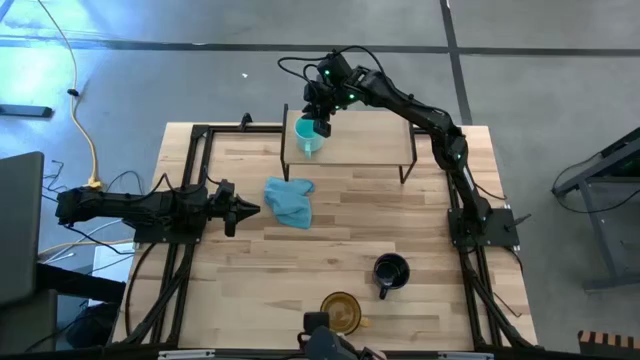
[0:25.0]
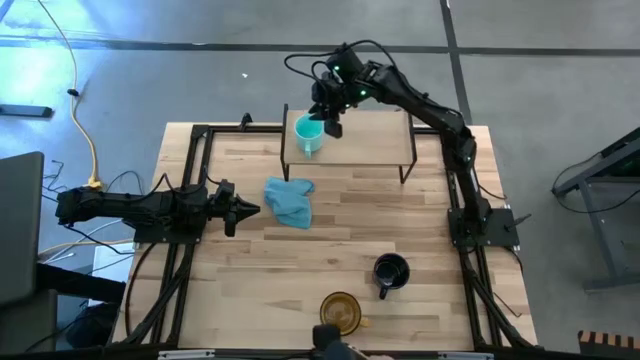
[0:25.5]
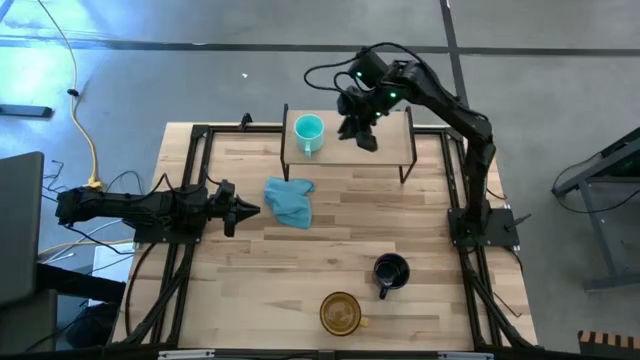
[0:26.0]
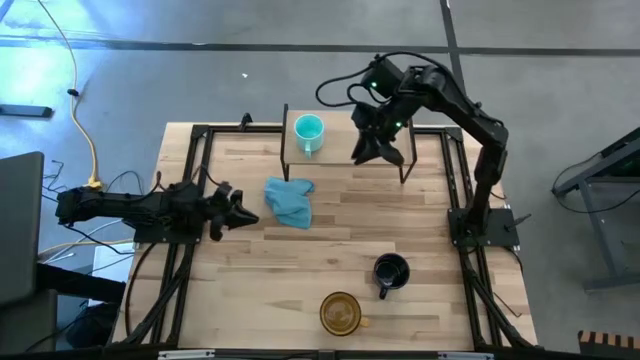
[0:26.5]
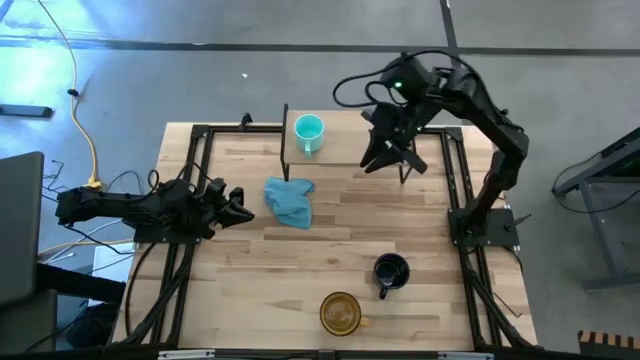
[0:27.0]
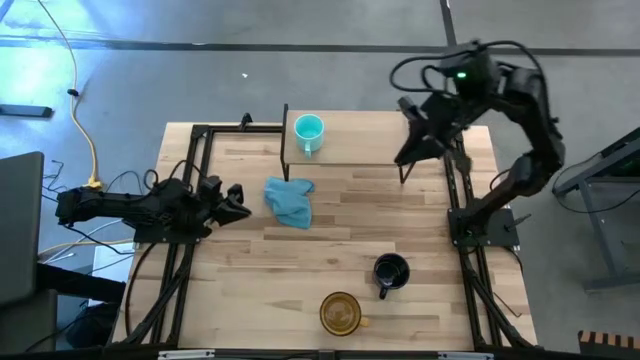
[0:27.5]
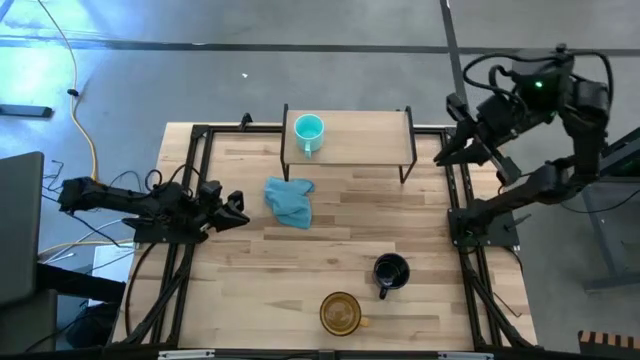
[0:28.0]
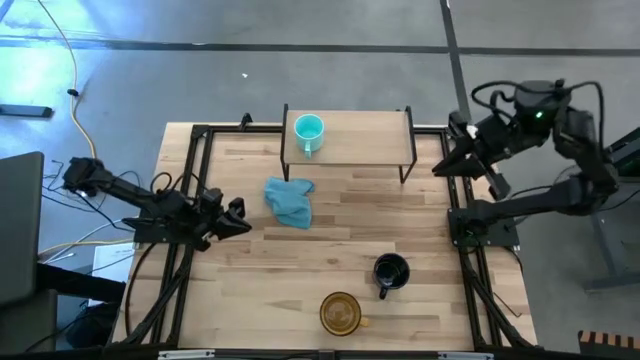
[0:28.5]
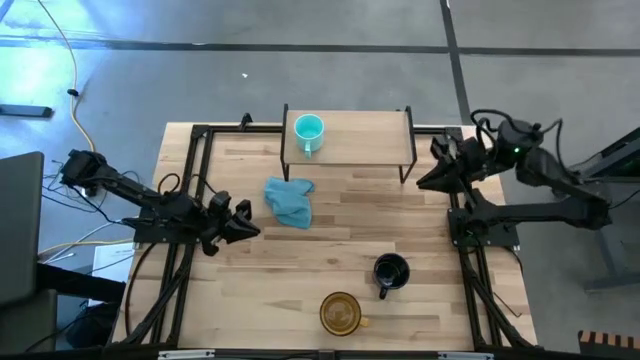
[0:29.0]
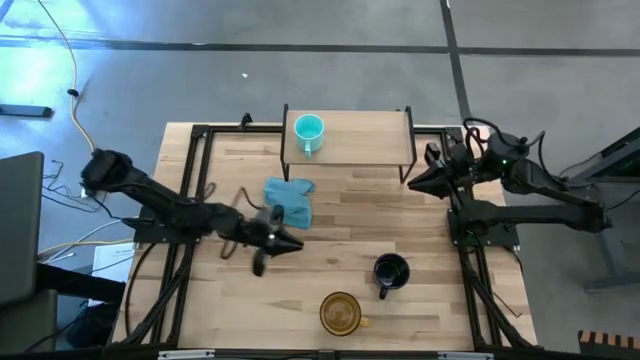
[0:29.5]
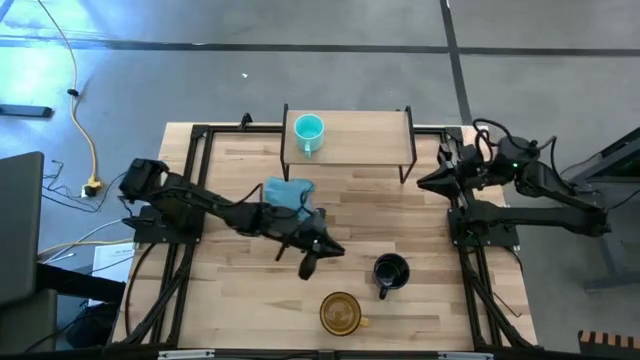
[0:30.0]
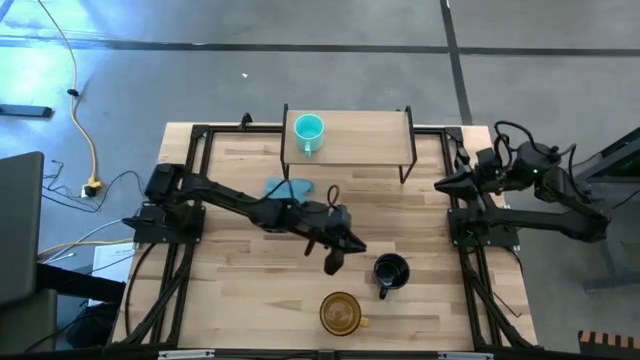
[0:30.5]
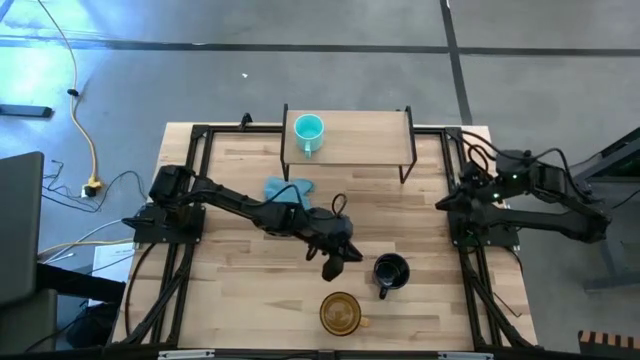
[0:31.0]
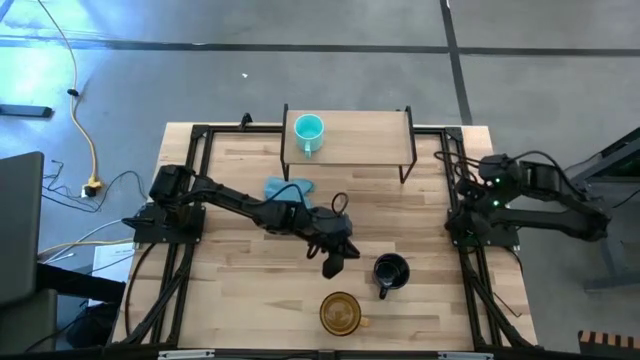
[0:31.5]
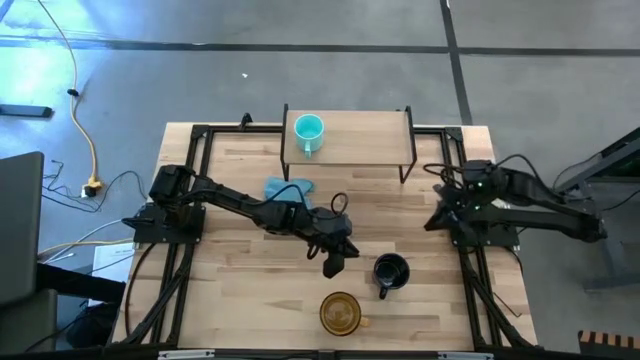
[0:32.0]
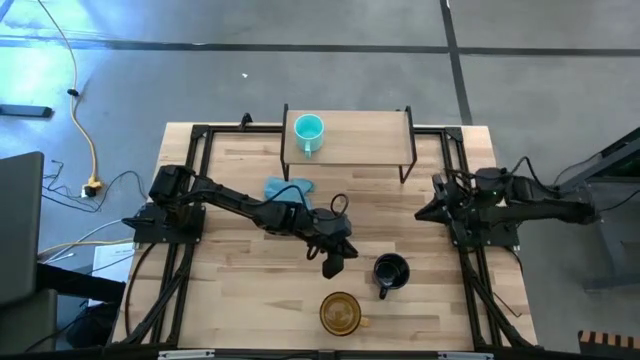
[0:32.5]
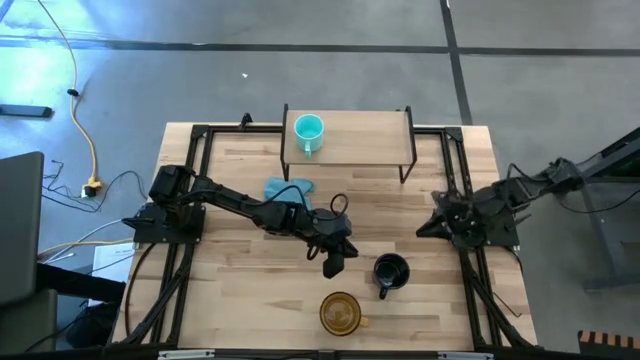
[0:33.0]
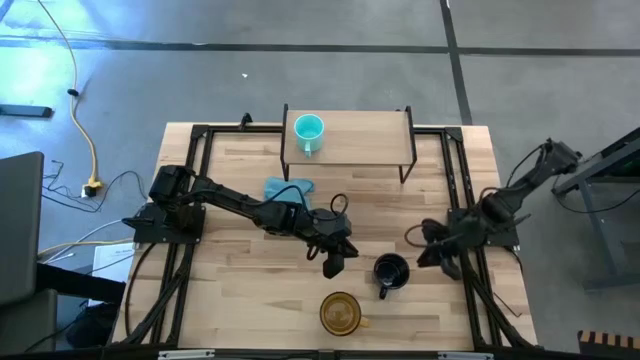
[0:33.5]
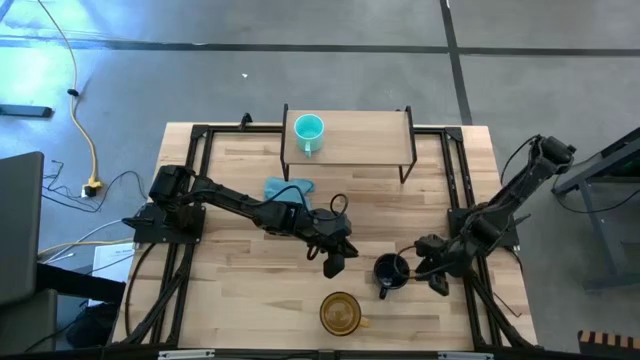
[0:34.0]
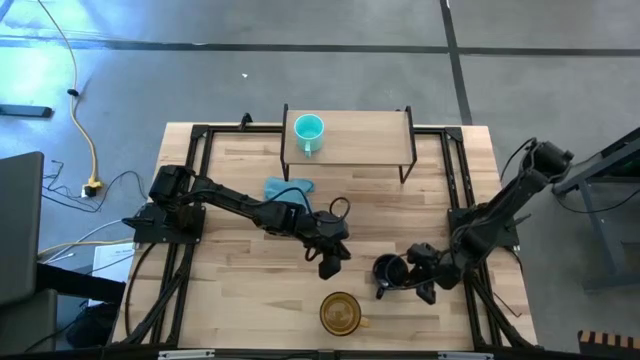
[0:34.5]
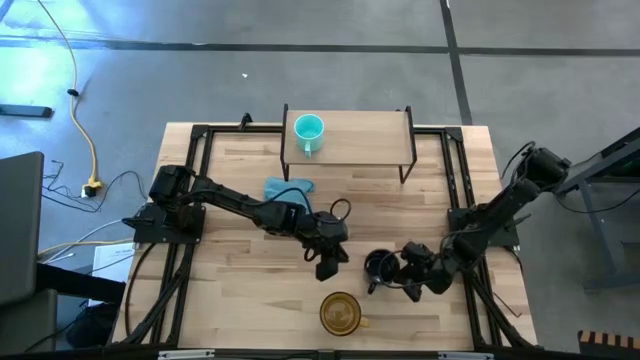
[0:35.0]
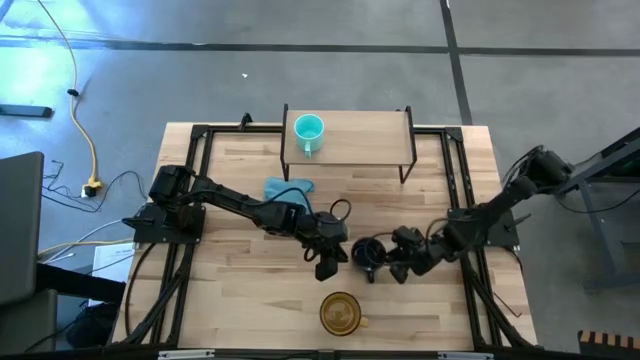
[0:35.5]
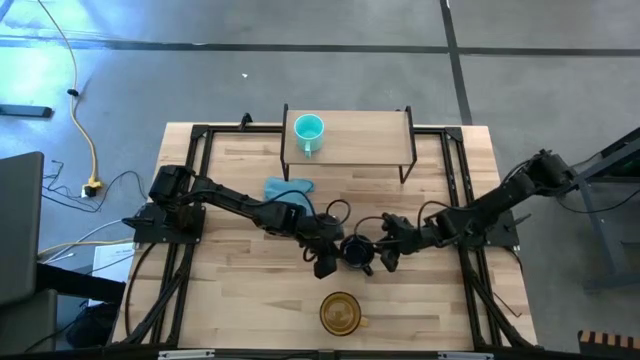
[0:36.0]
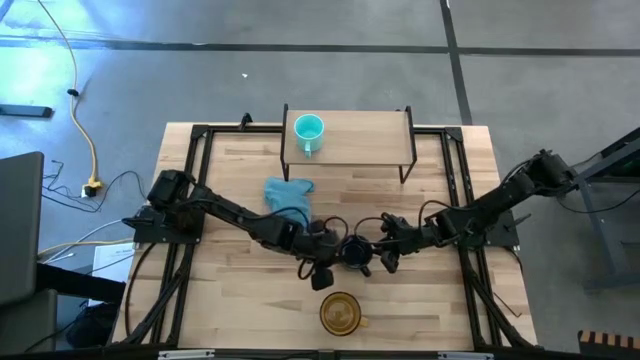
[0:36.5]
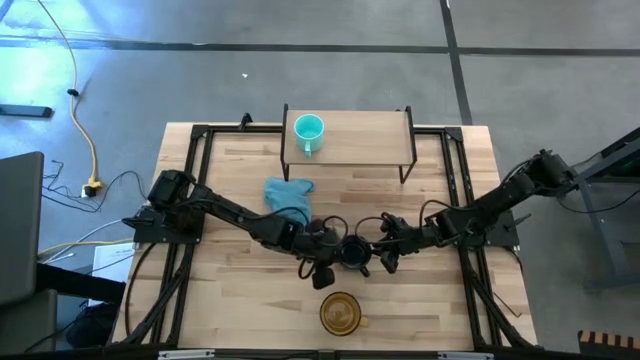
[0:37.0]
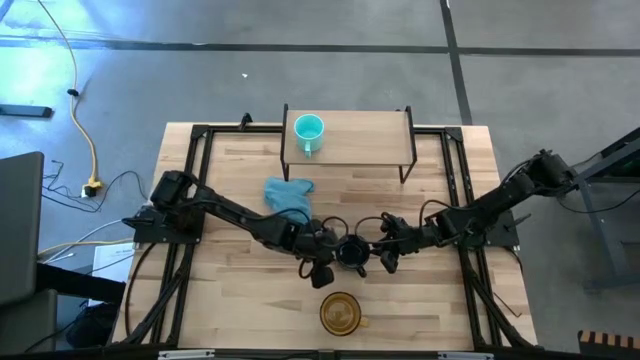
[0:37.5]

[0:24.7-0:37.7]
Task: Stack small to large cups/mugs on shelf
Put the black mug on the shelf

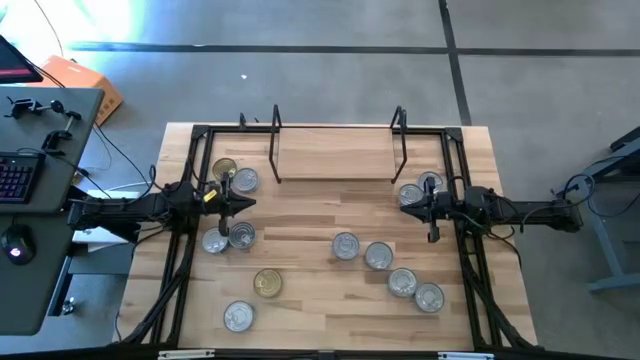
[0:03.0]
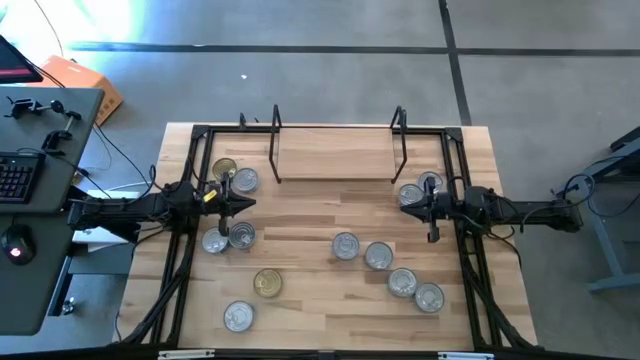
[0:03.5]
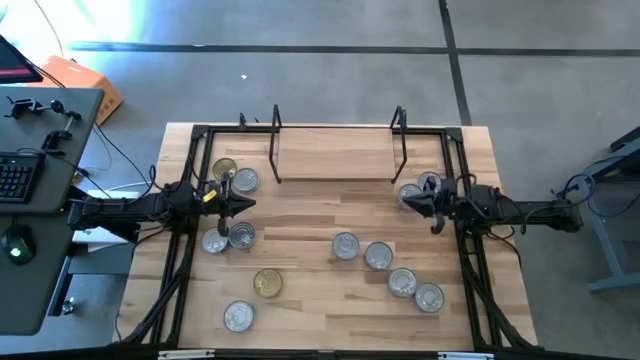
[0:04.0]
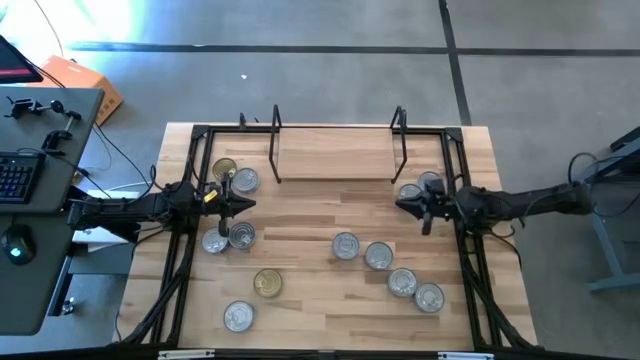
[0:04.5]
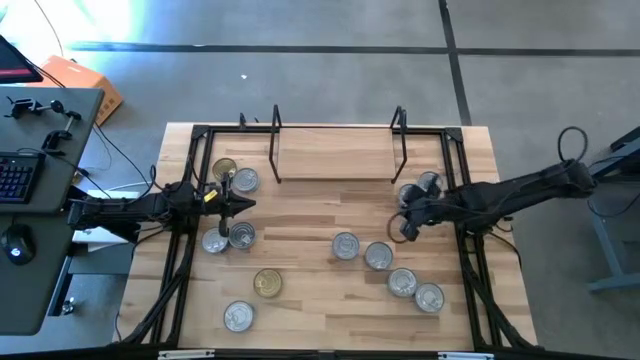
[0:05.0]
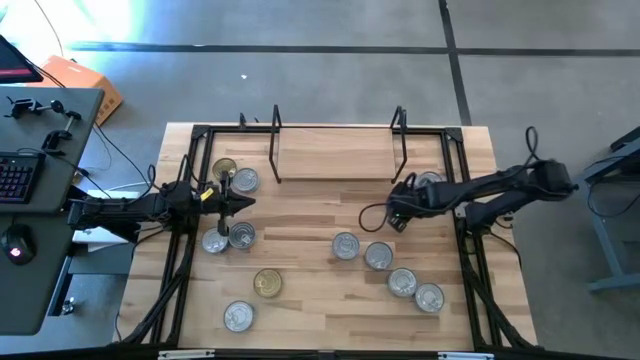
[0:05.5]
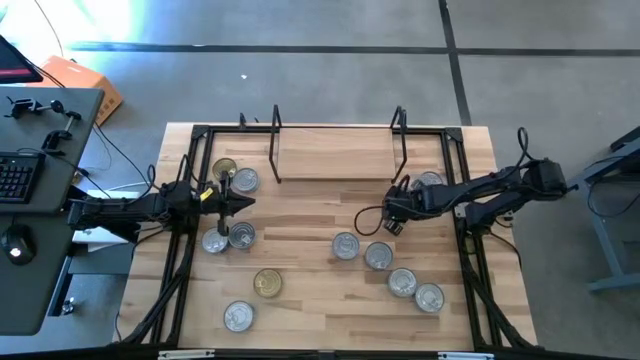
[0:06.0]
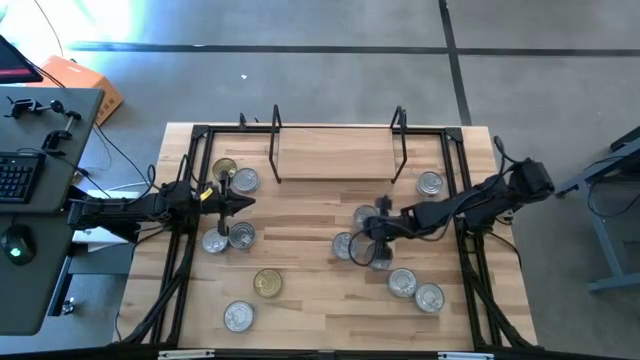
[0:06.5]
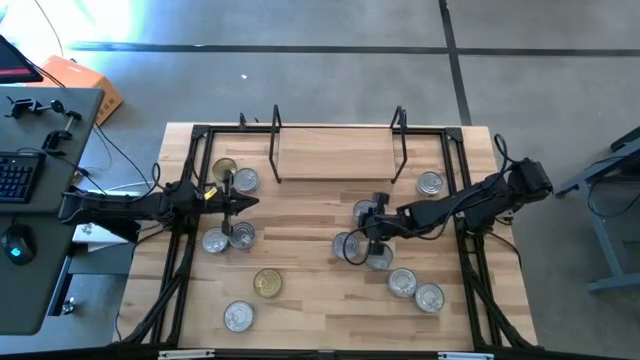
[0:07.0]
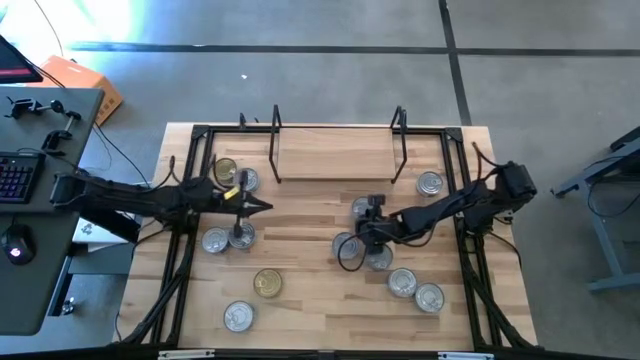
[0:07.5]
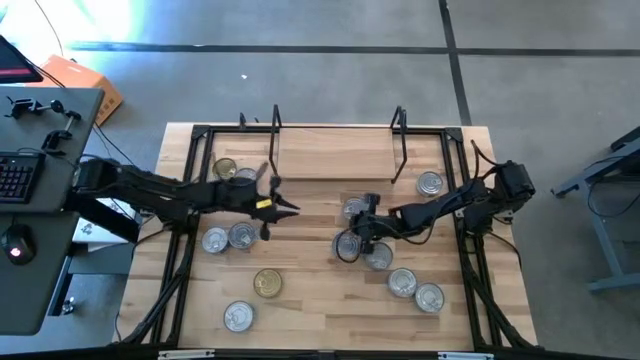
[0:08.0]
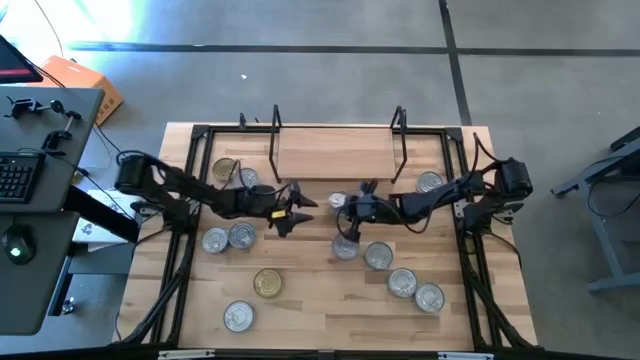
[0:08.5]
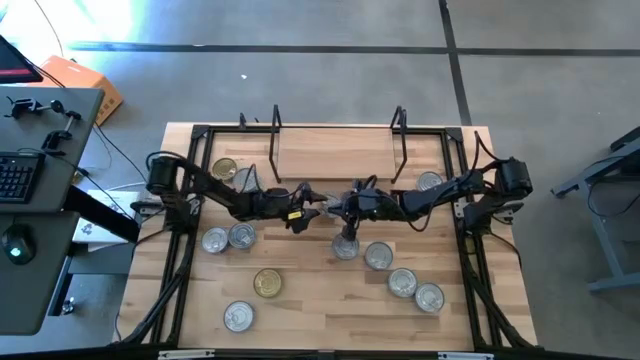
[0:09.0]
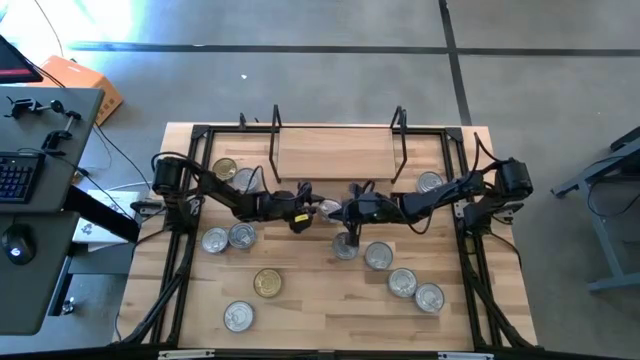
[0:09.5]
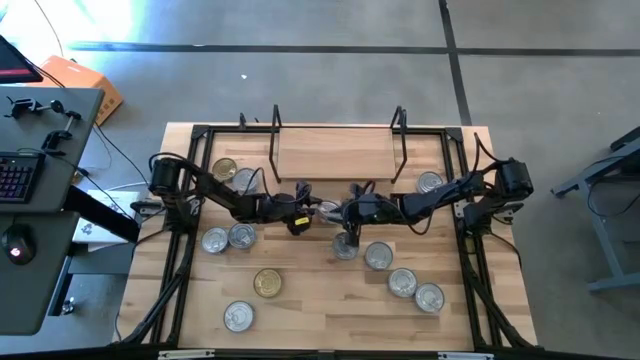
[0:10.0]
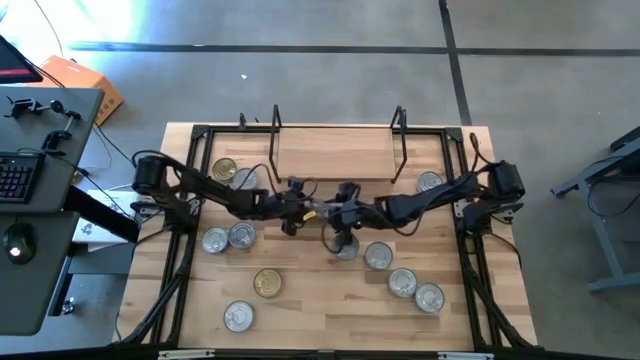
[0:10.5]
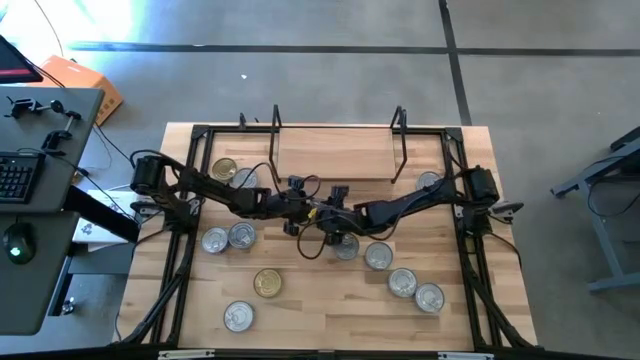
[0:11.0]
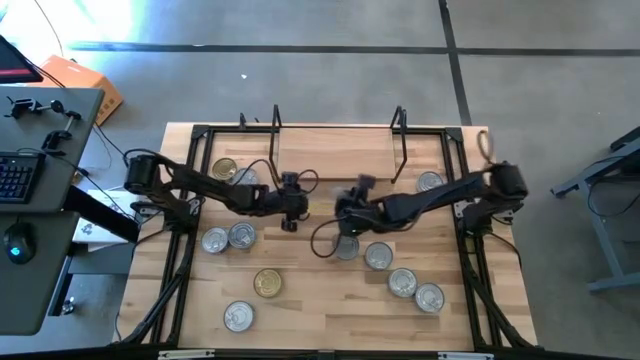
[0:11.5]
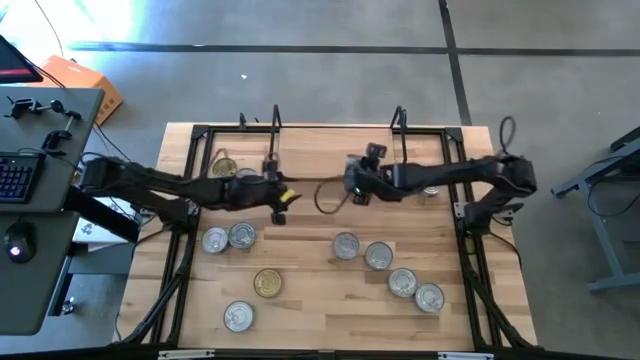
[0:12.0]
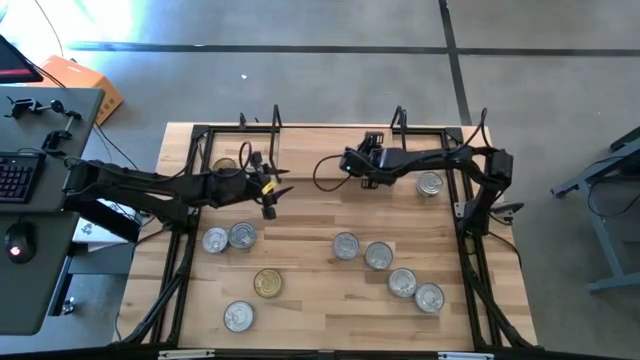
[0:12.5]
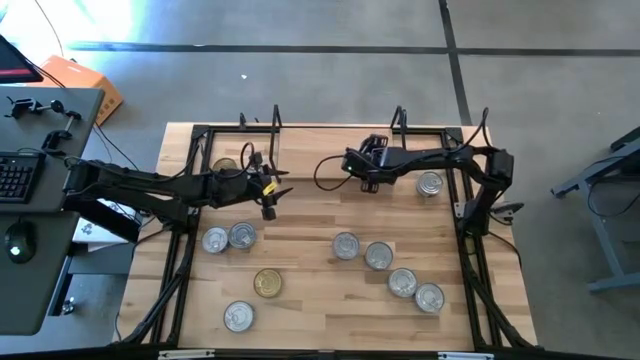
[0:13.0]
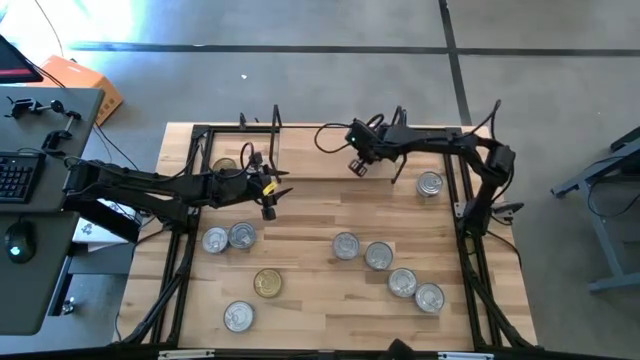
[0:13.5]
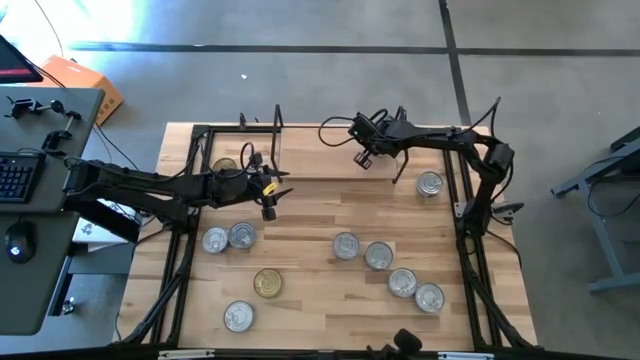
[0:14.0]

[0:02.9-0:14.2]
Task: Stack canned seafood by type on shelf
Put the yellow and blue tuna can on the shelf
